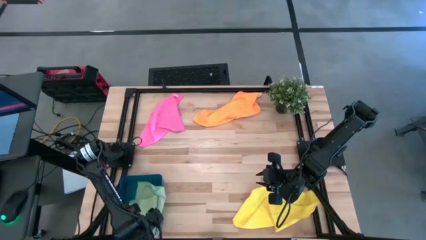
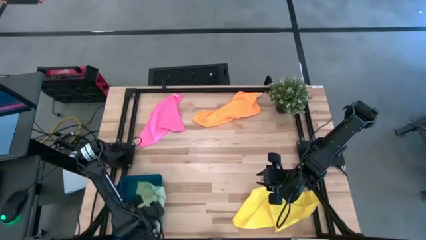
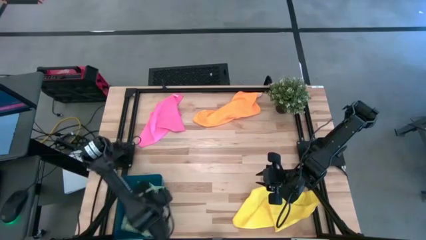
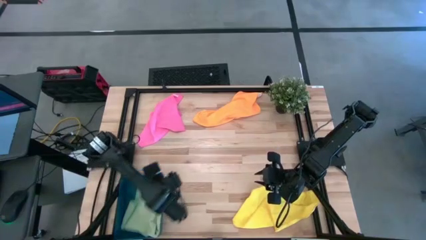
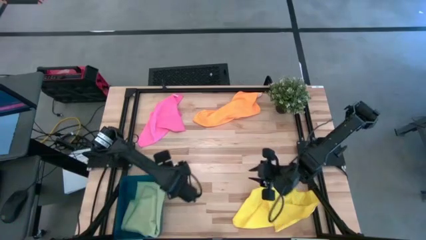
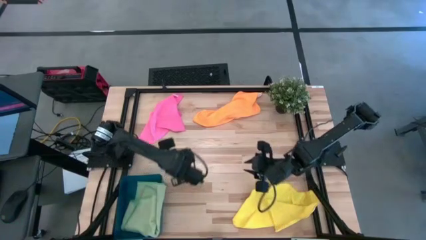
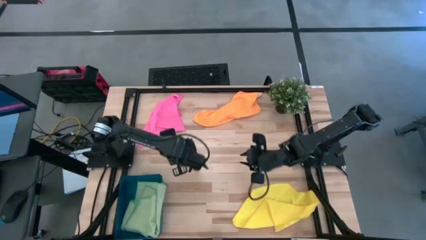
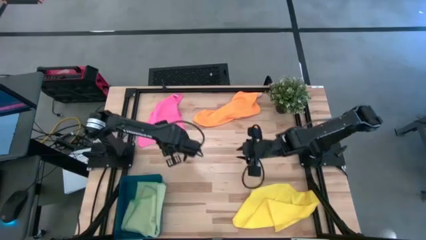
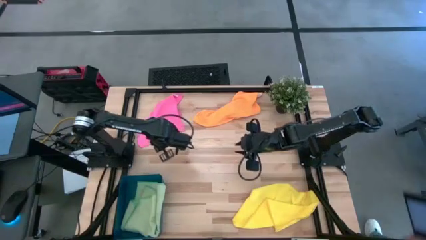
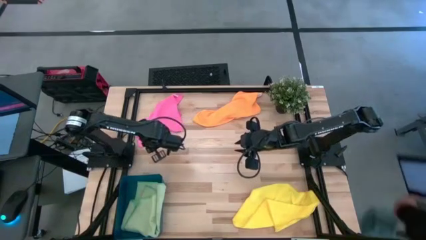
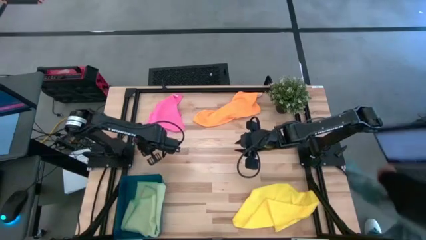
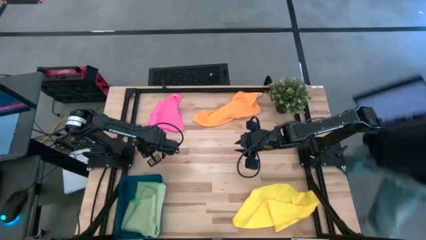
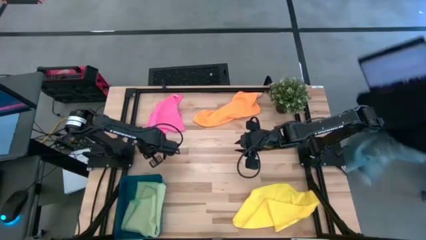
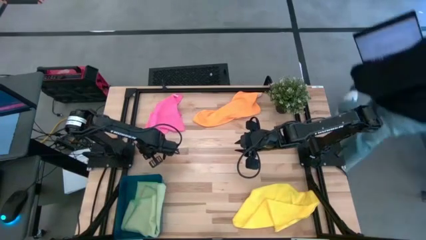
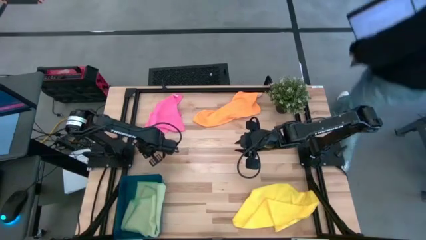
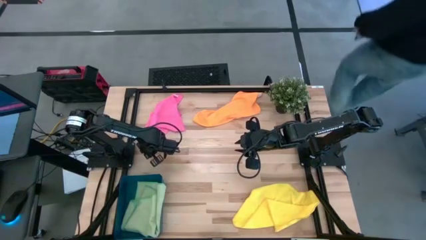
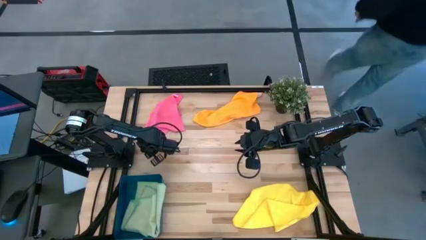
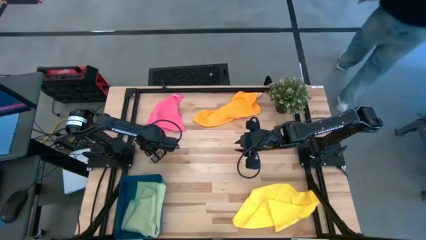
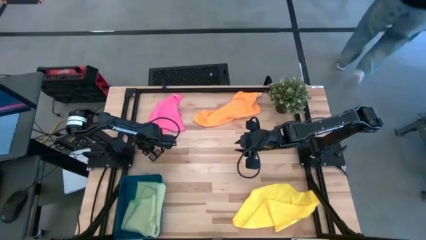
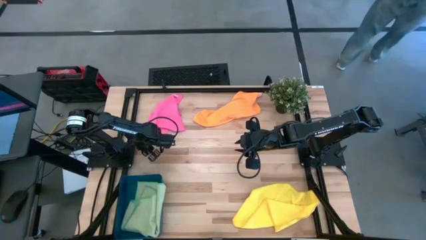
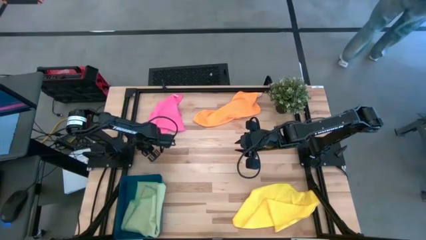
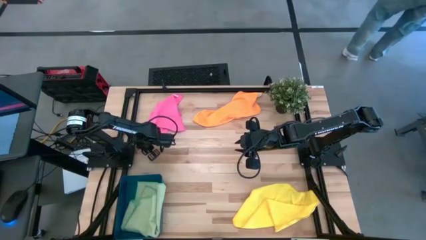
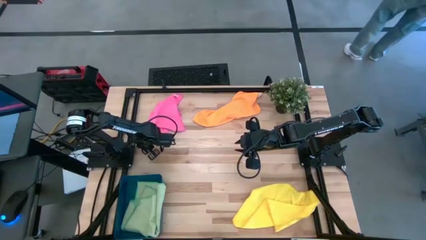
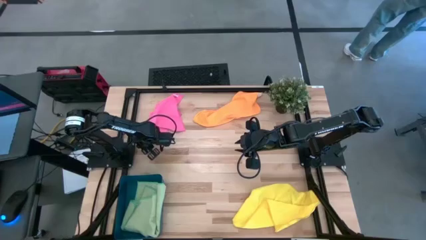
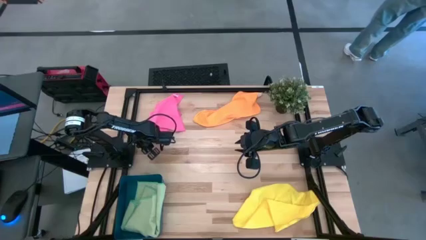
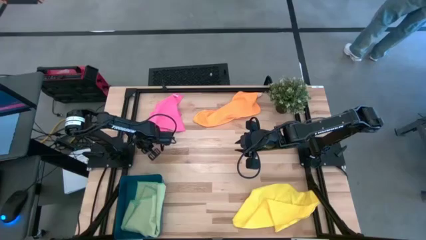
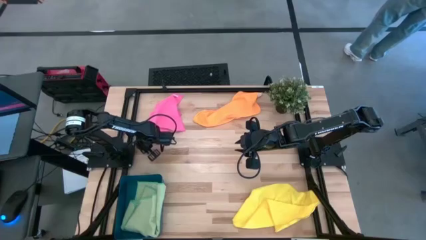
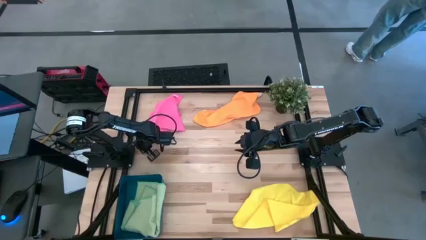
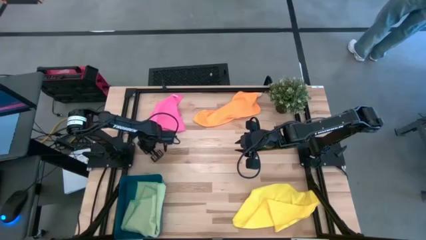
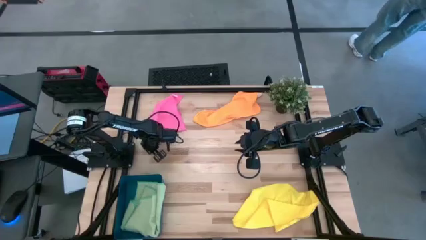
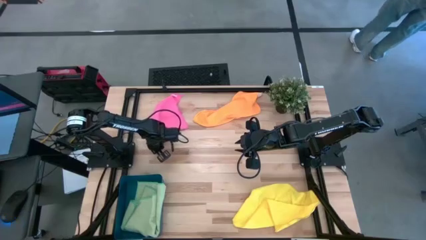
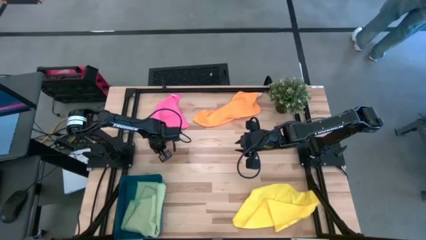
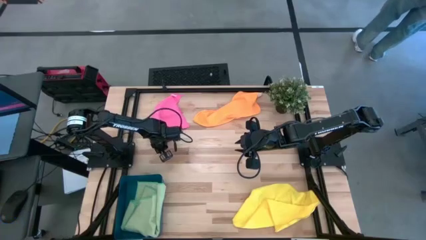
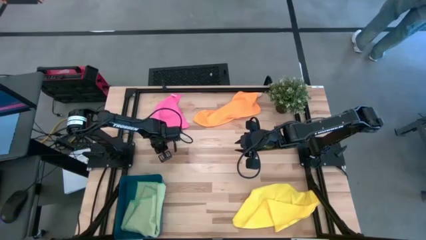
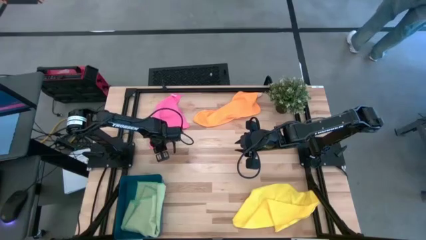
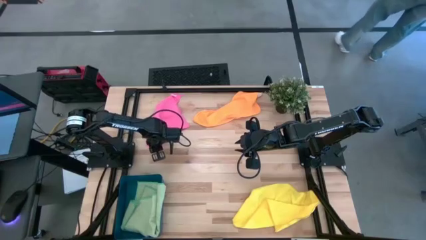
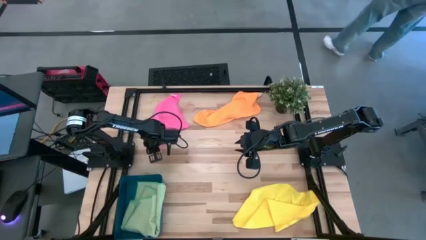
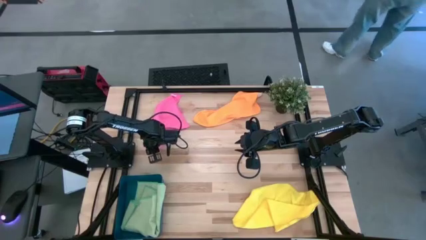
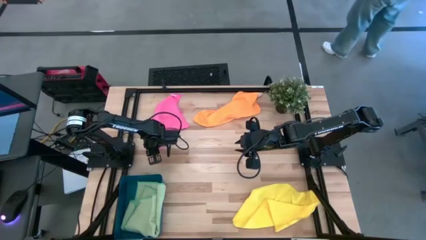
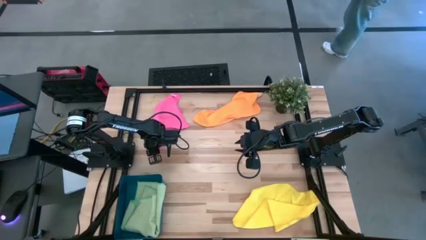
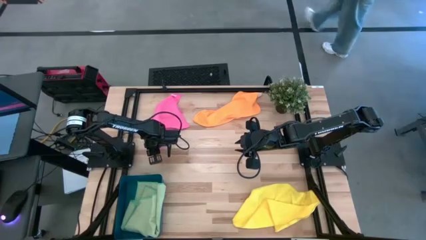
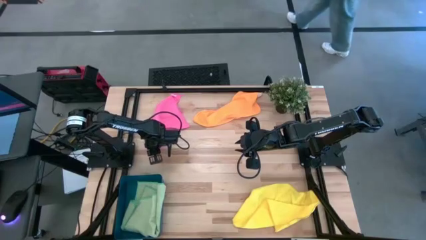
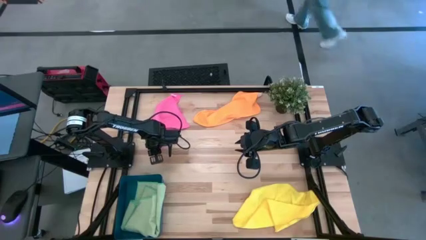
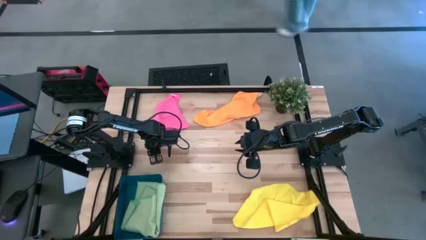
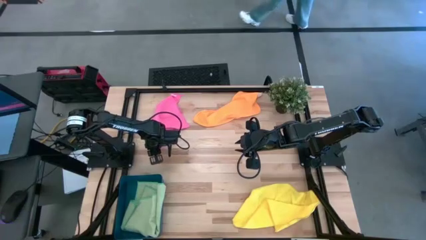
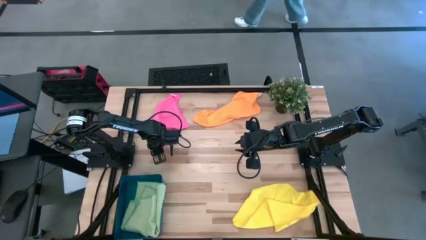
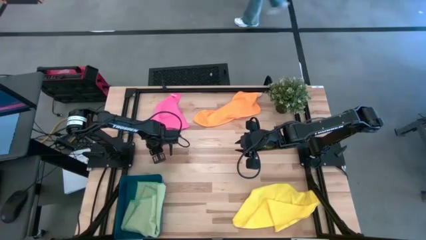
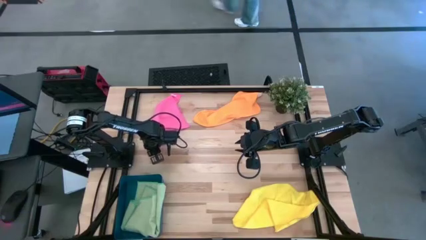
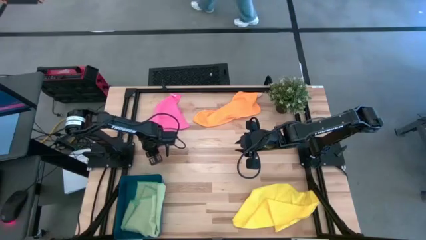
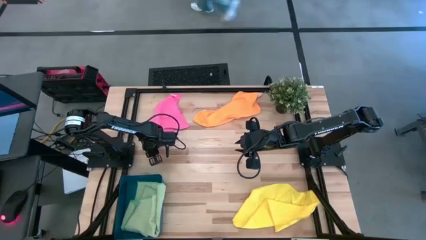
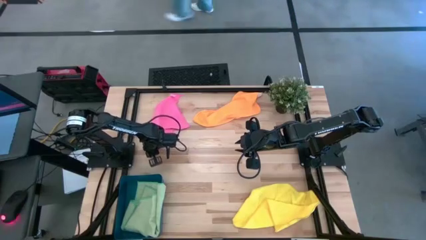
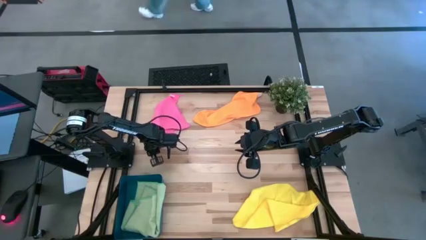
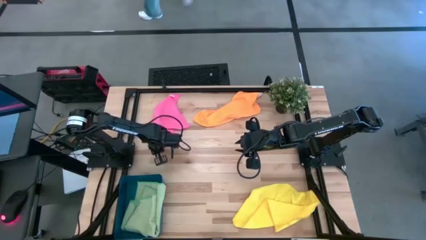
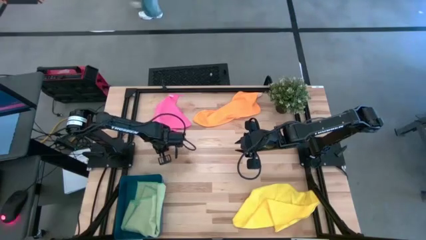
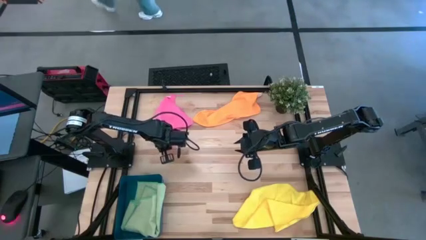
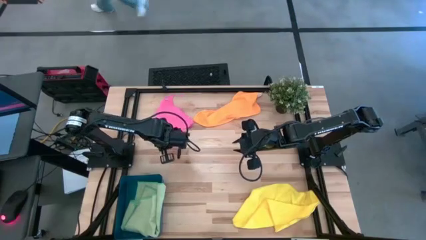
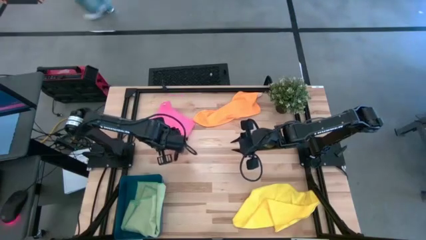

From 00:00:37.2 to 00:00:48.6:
Task: Fold microfiber towels
Fold the pink microfiber towel

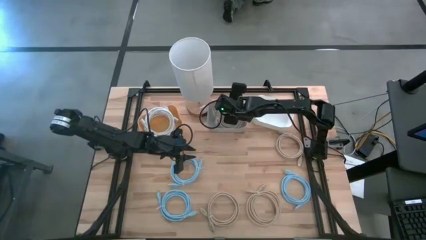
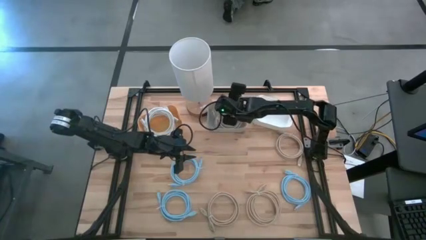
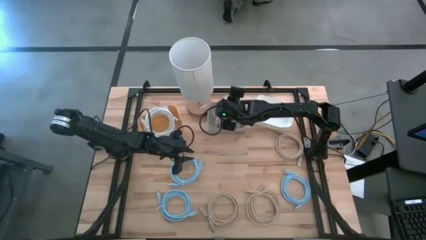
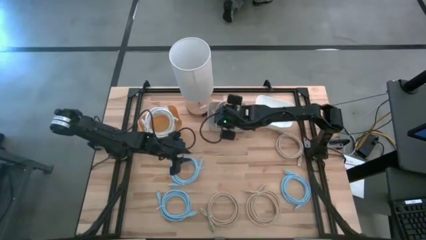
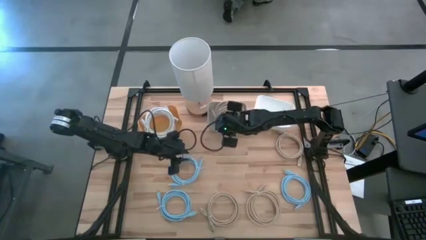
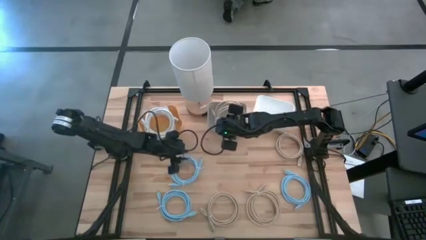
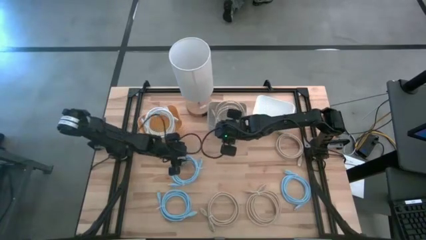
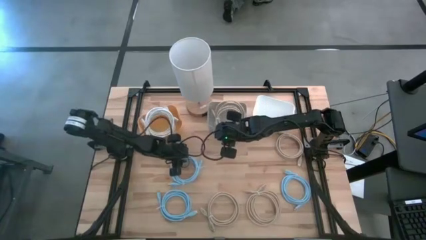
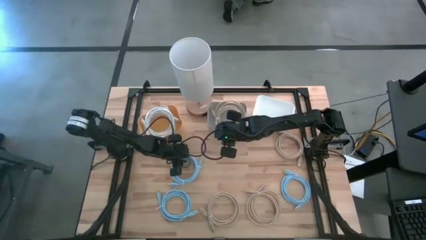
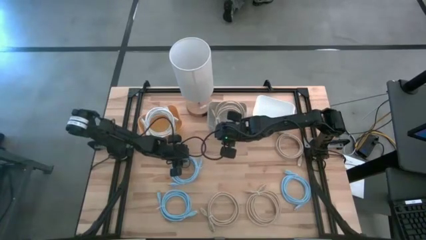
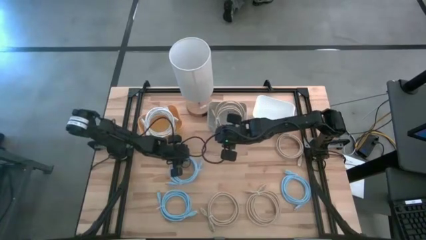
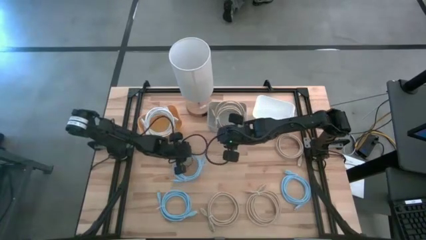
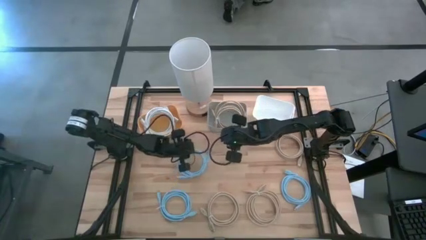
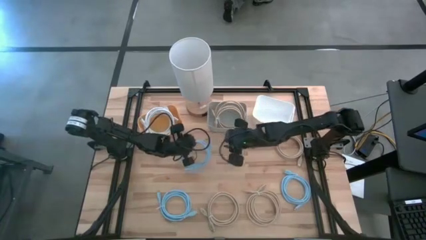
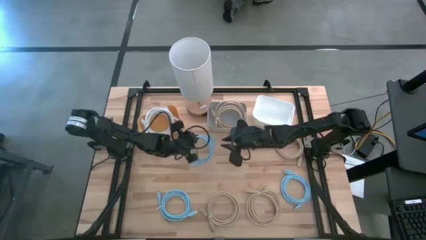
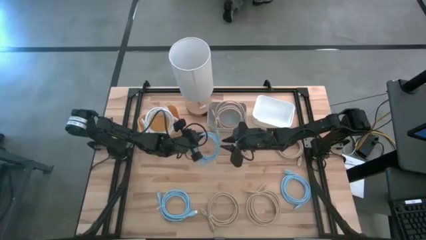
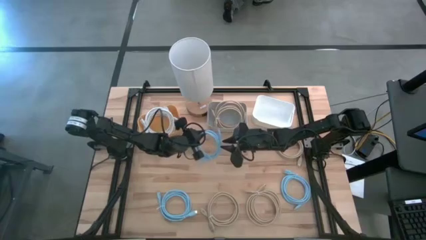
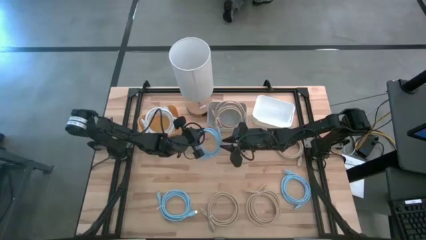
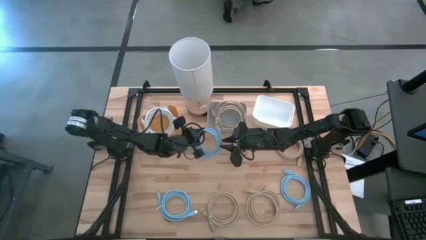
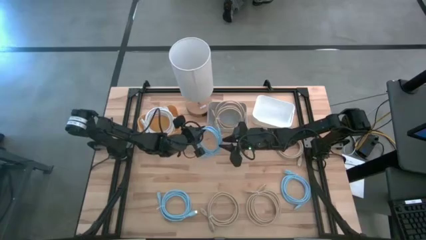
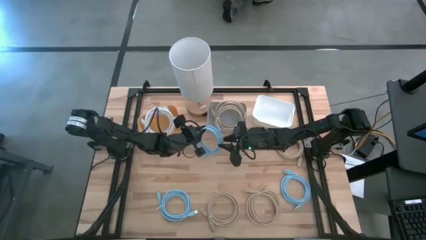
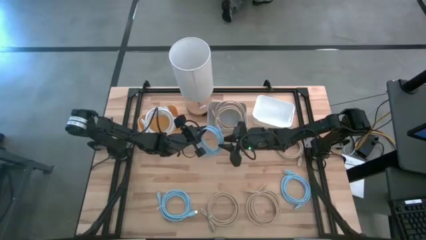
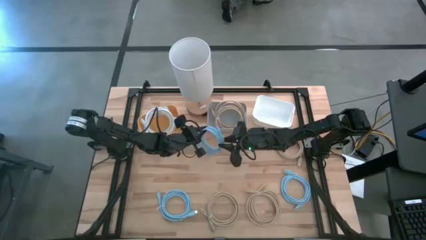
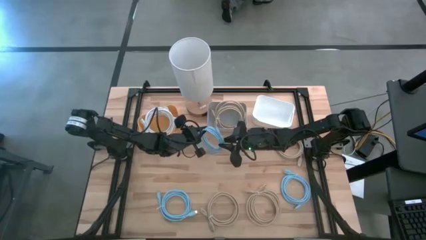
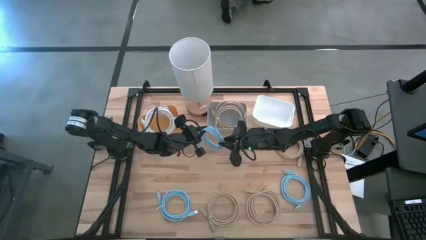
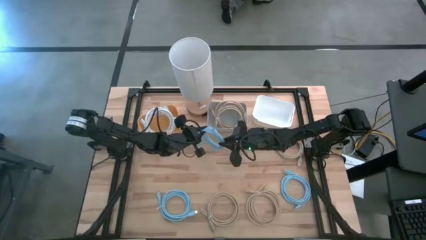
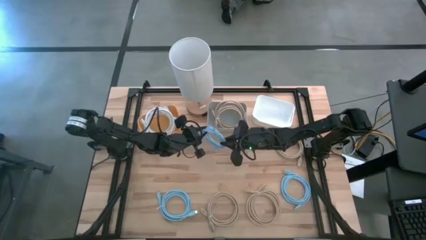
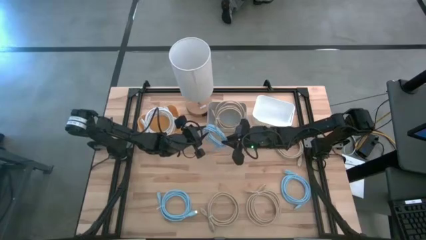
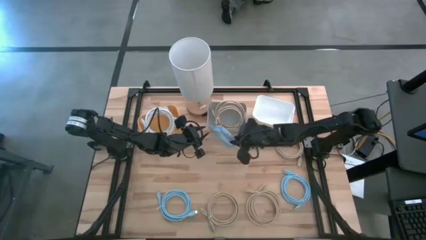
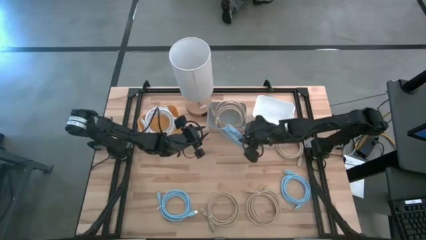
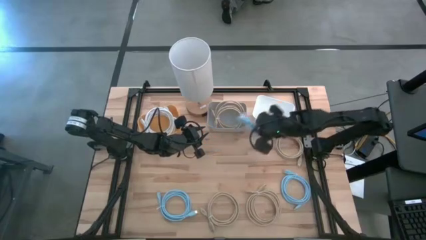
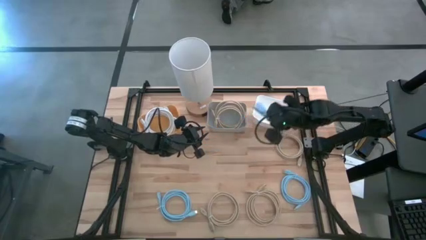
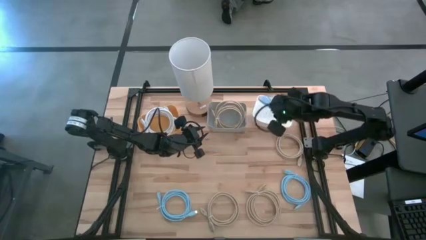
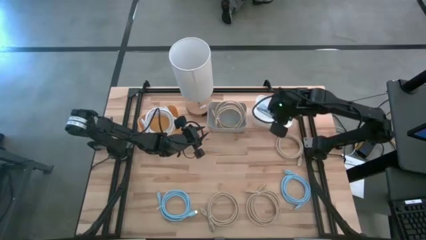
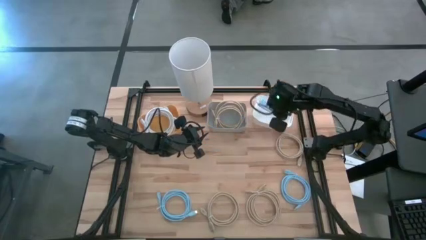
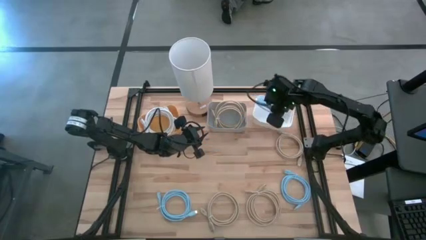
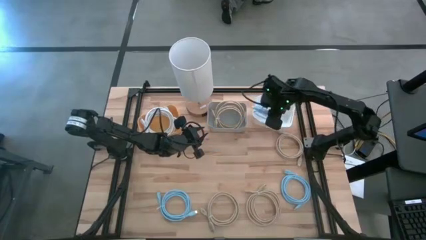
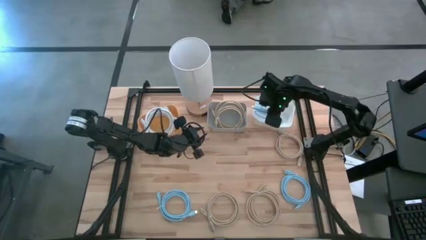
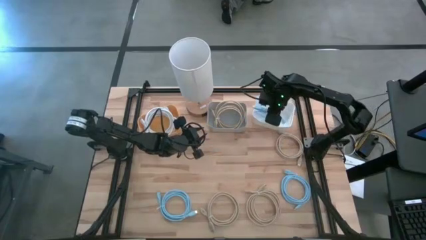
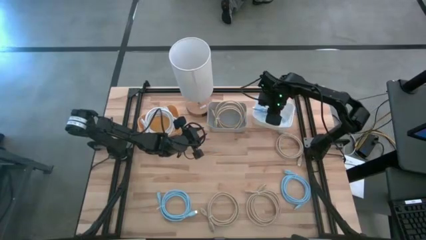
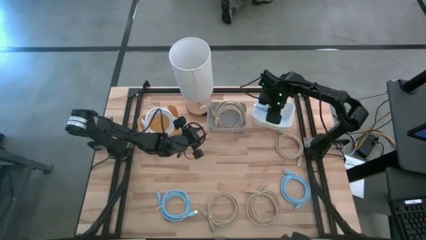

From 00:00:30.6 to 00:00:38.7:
Task: Sort HDMI cables
Put the top blue HDMI cable into the white bin
